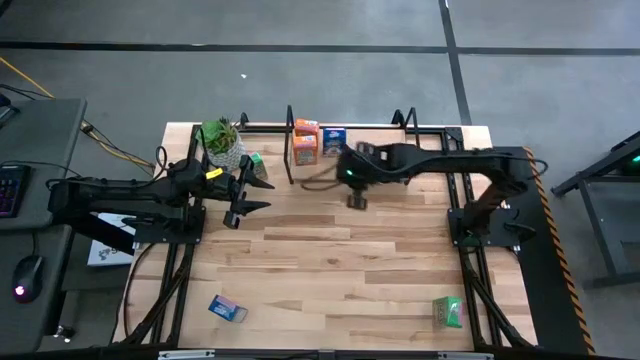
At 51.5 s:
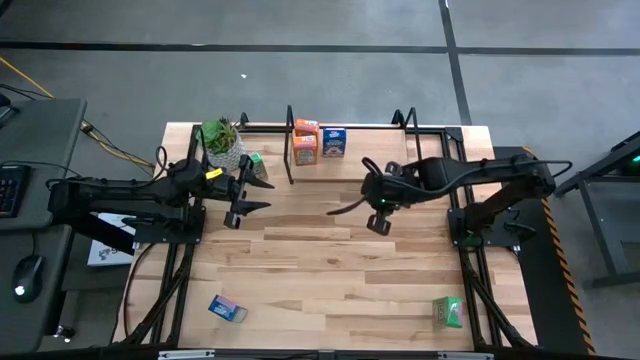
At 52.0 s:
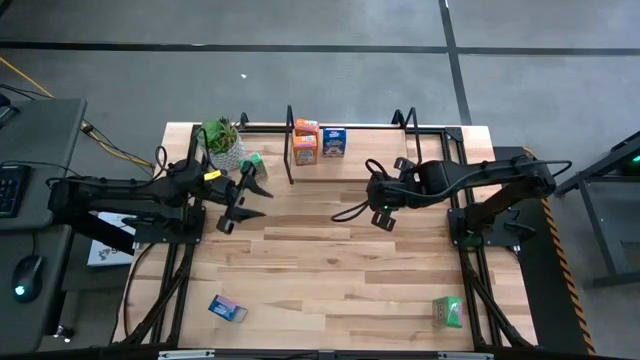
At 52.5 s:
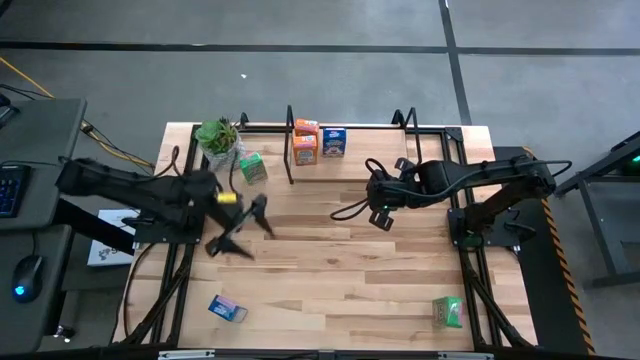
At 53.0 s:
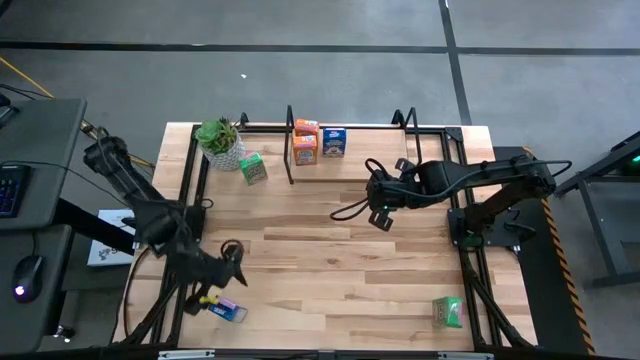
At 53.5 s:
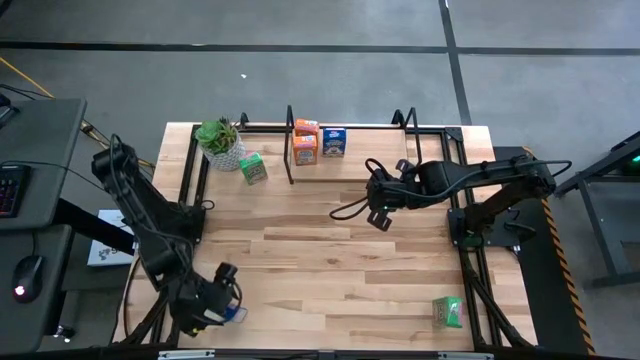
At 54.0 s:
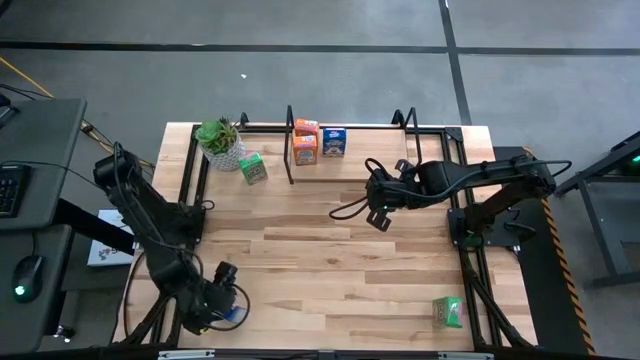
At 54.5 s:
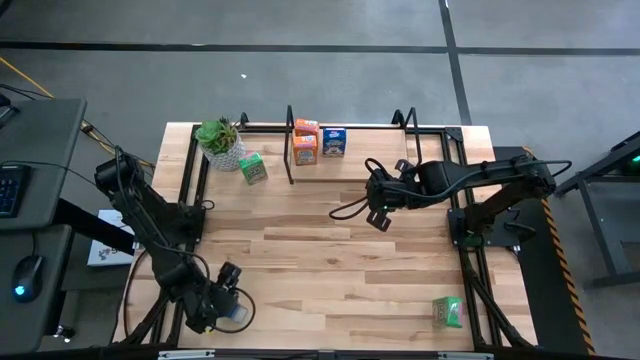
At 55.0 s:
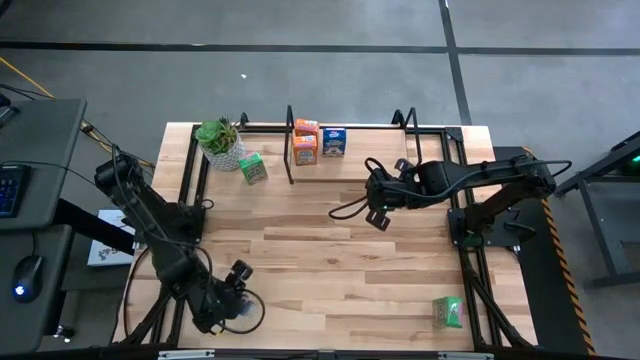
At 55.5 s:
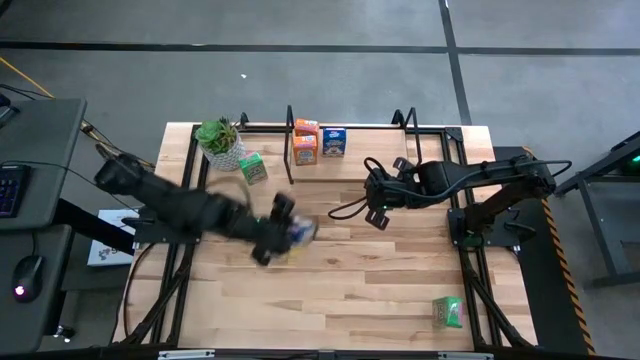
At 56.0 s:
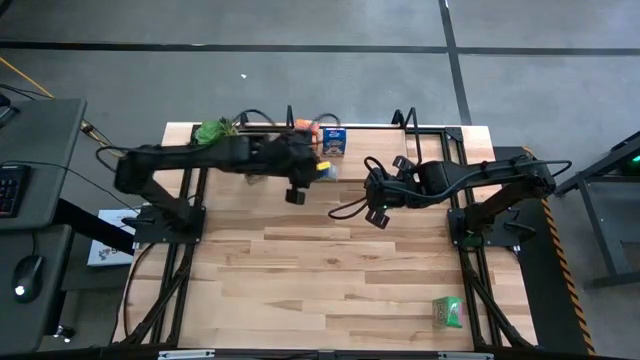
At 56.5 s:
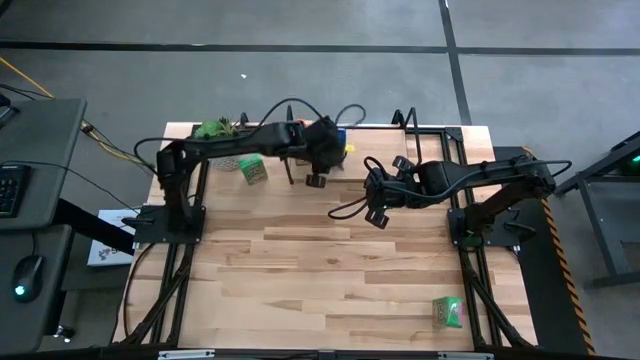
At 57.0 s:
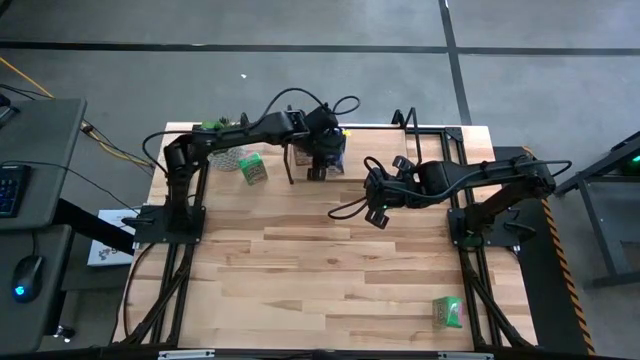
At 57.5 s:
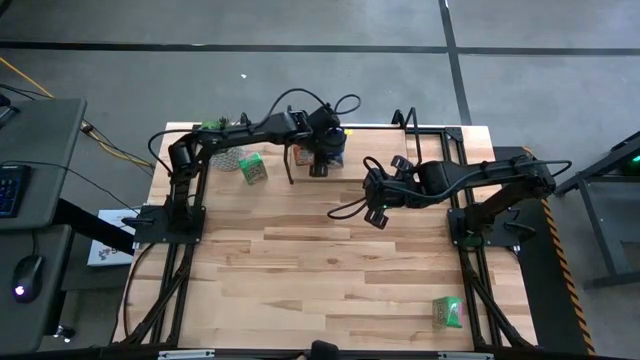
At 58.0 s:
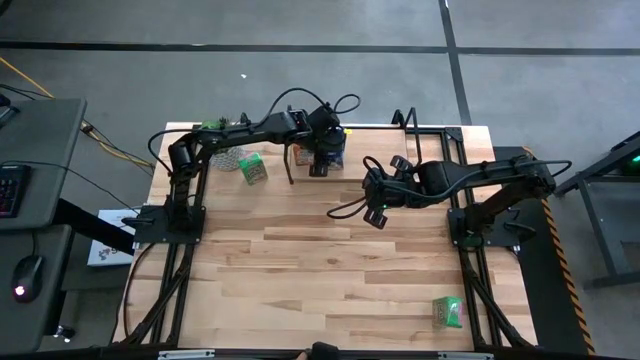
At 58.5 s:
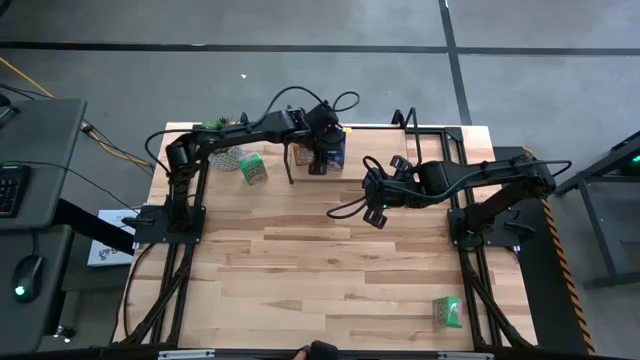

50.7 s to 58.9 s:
Task: Stack cereal on shelf
Put the blue cereal box on the shelf aligned with the other blue cereal box

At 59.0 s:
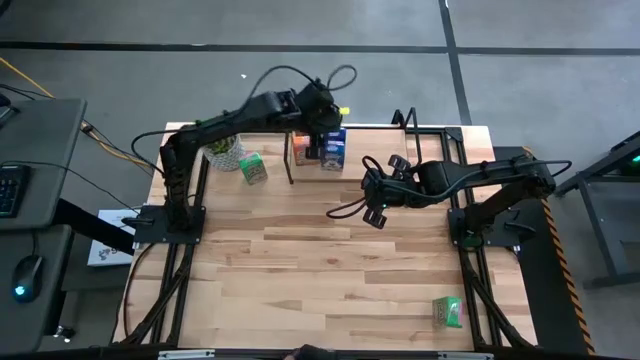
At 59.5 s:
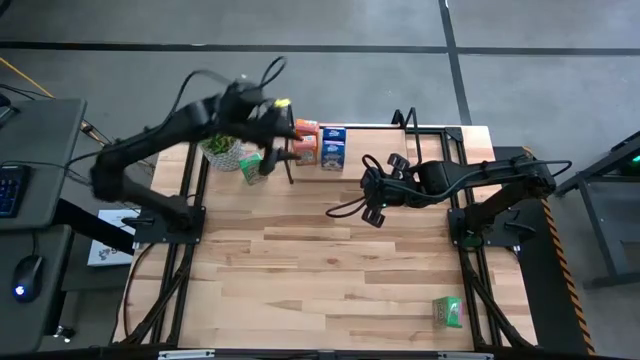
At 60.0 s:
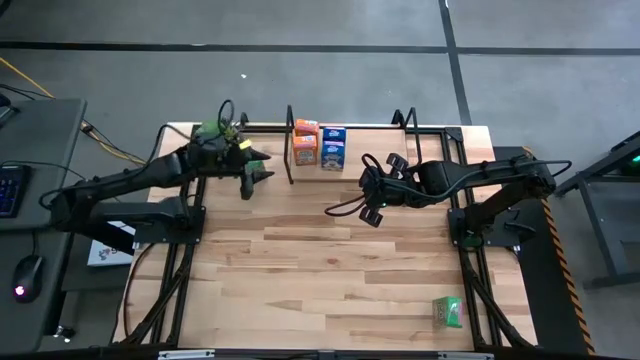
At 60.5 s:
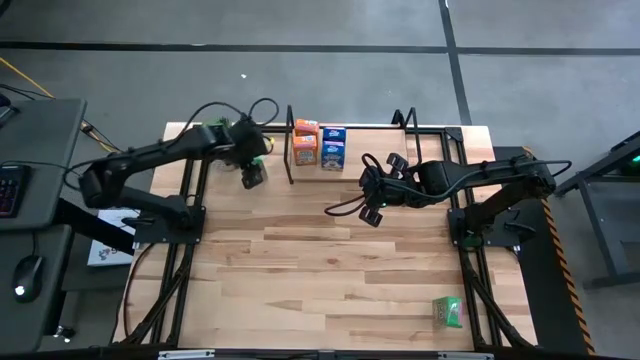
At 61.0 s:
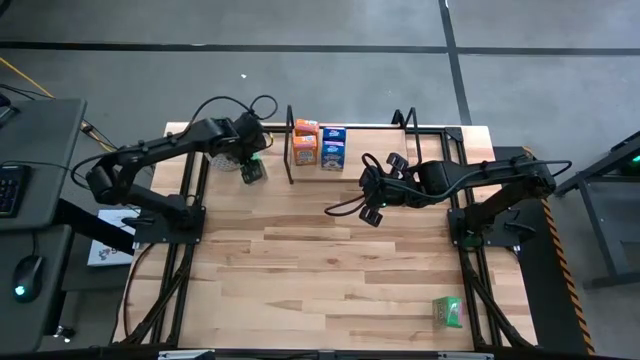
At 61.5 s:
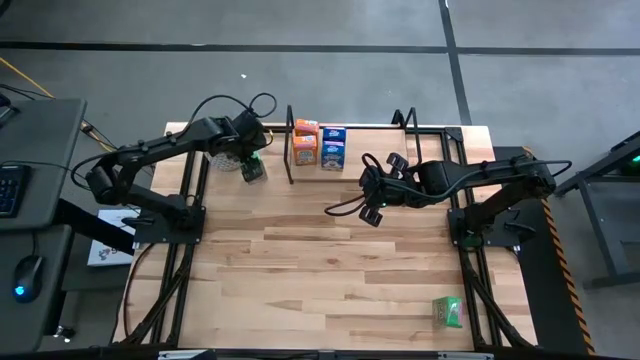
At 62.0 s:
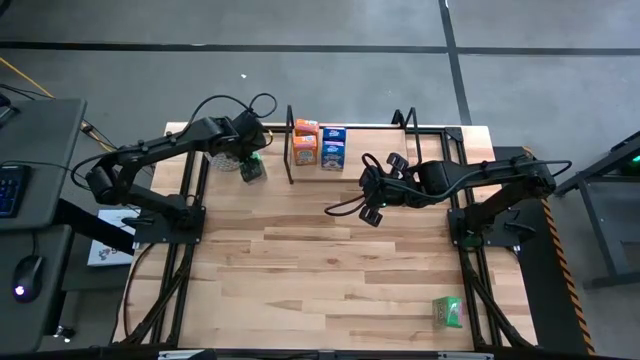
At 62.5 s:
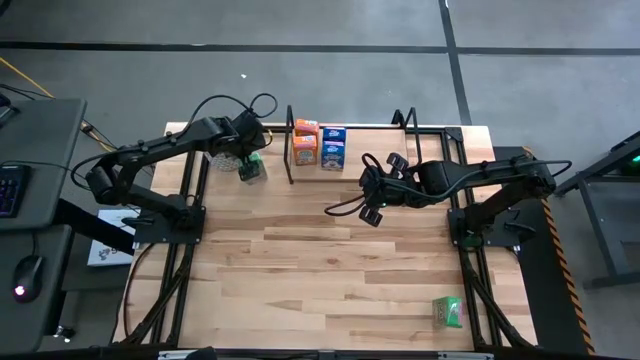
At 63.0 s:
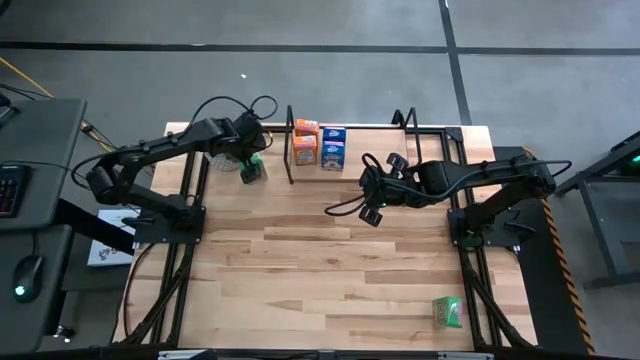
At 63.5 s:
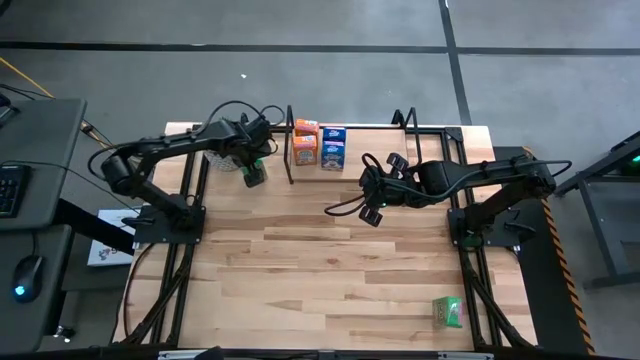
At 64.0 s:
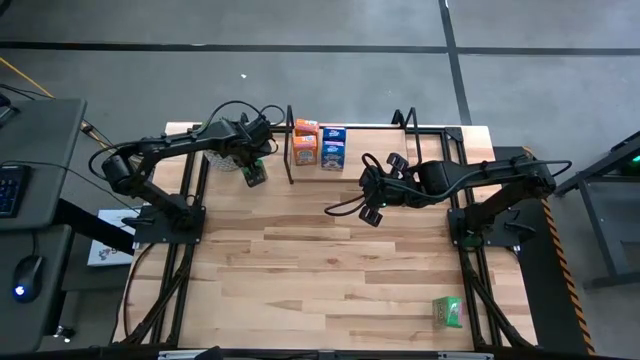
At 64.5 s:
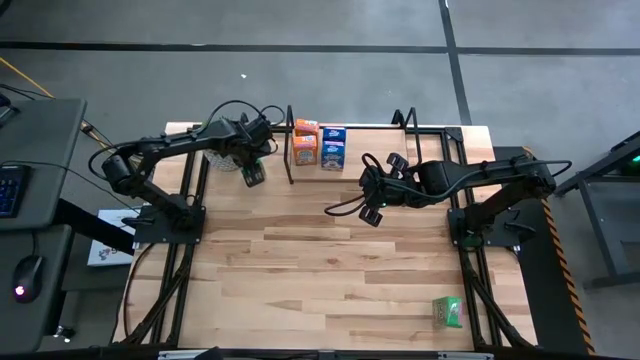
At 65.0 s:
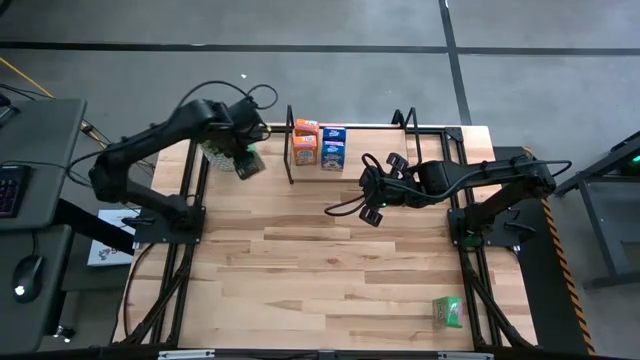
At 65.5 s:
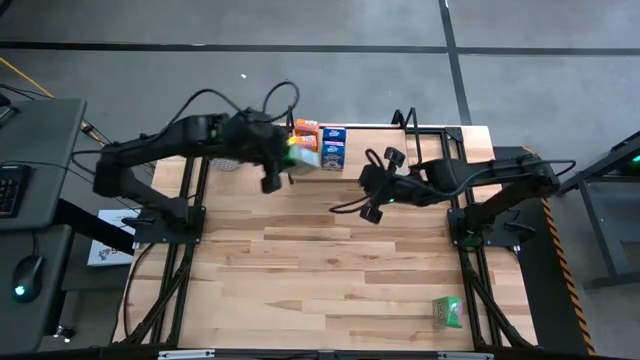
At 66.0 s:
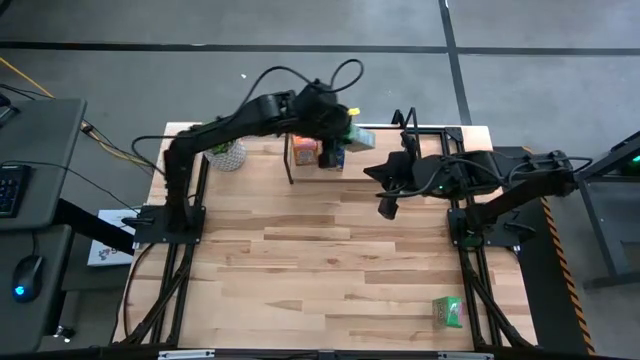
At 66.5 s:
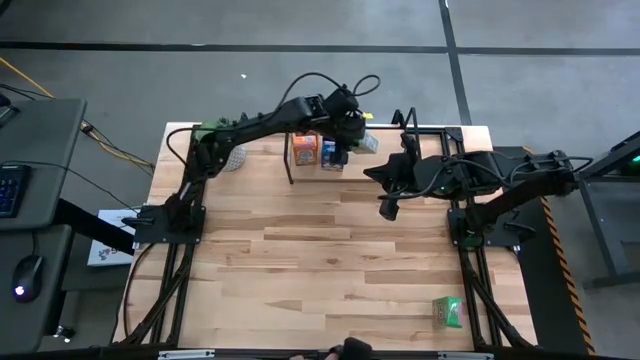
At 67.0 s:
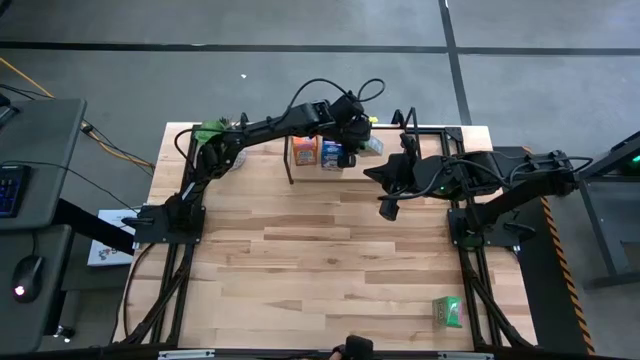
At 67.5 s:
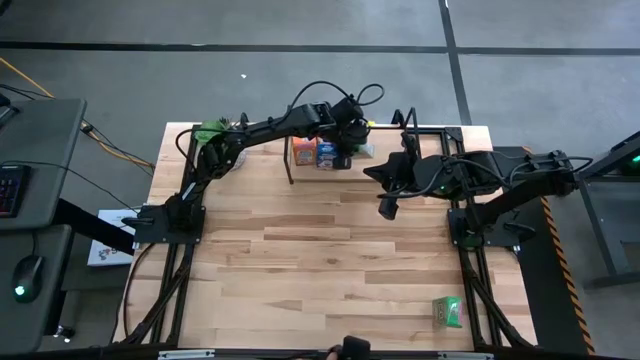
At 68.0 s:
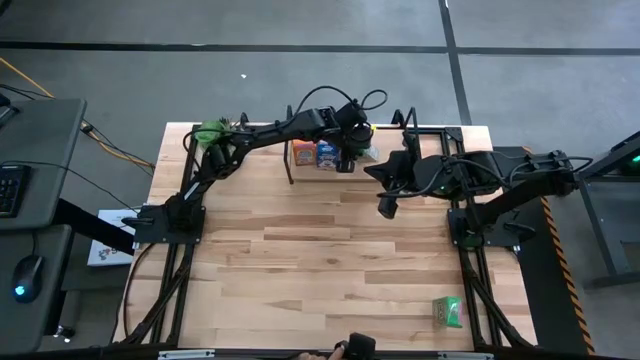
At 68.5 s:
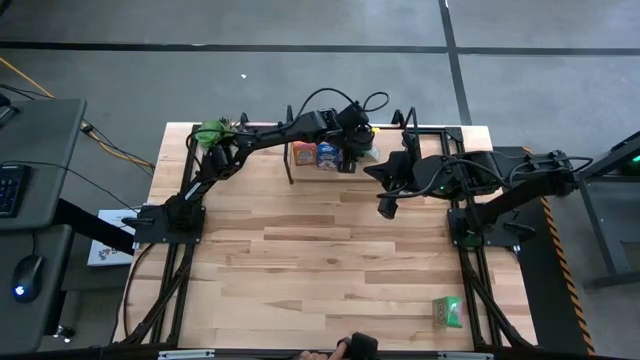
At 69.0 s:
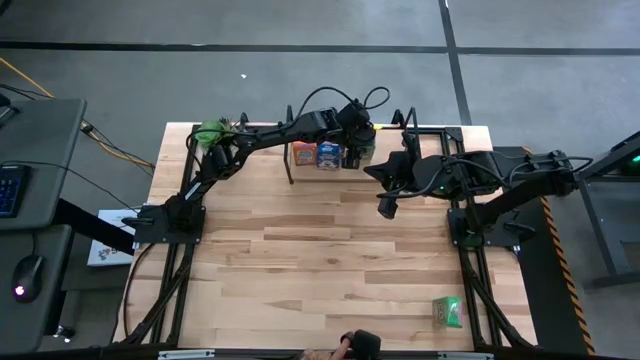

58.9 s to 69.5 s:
Put the top green cereal box on the shelf

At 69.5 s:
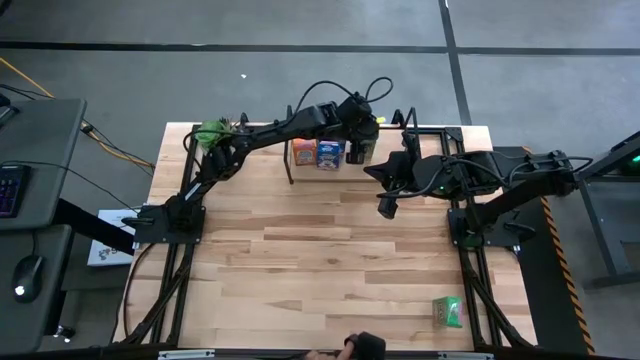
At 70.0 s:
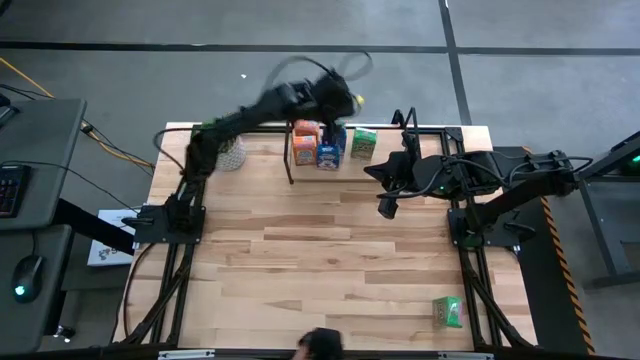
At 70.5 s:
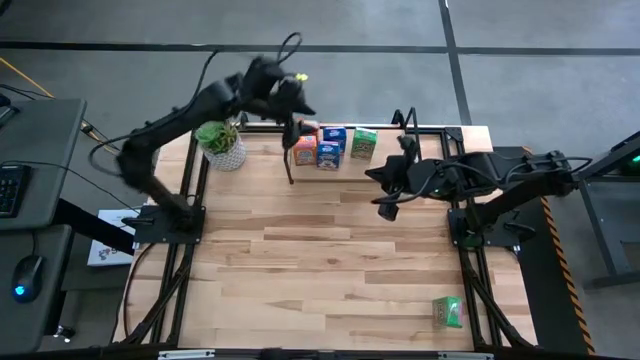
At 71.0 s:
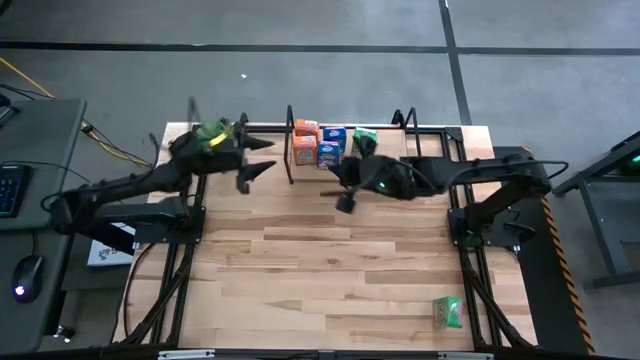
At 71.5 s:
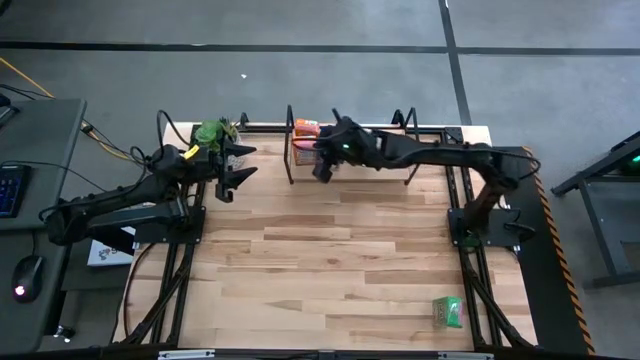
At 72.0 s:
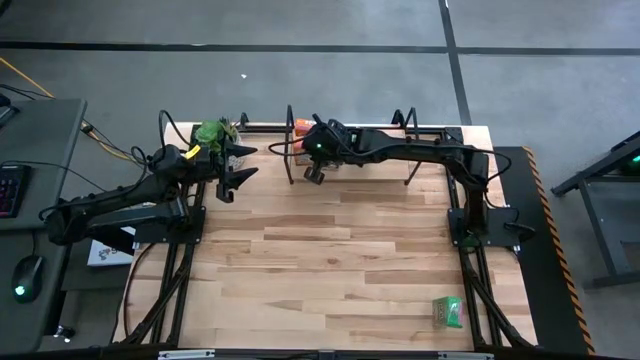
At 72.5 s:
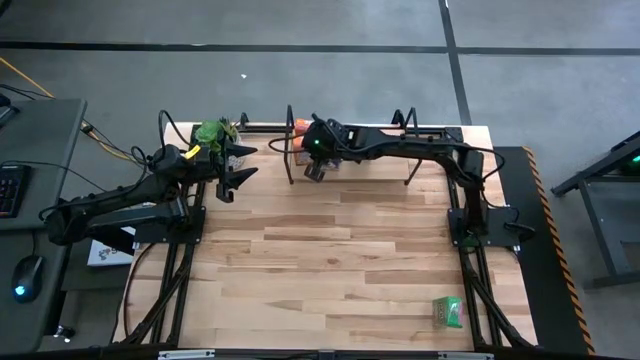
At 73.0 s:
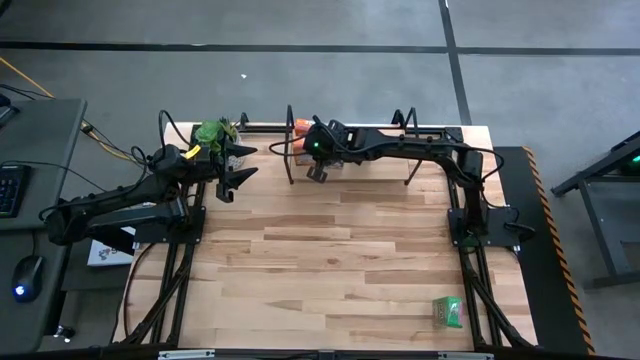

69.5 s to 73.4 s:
Adjust the blue cereal box on the shelf
